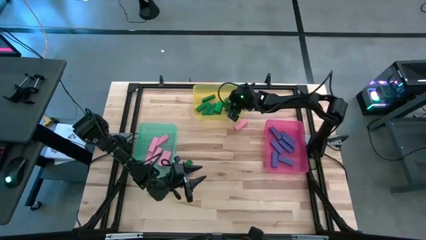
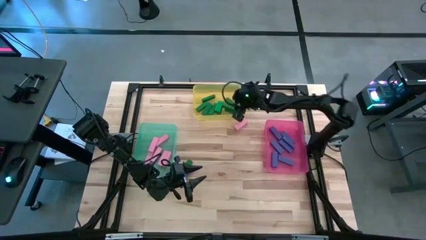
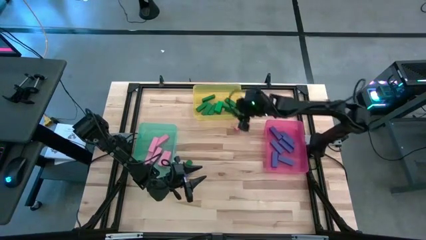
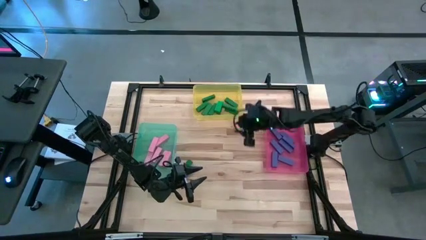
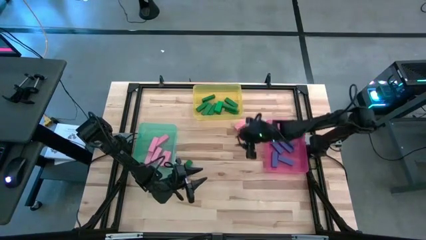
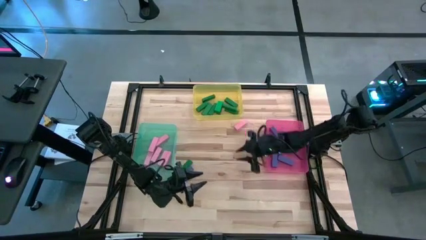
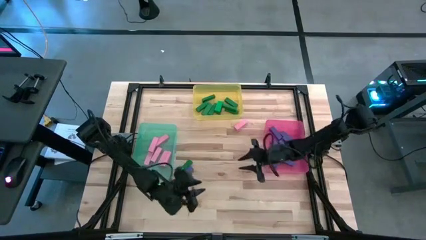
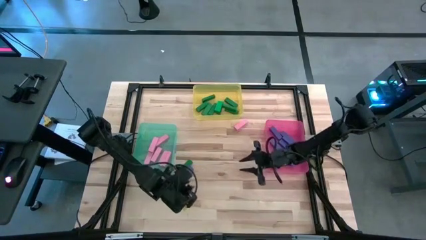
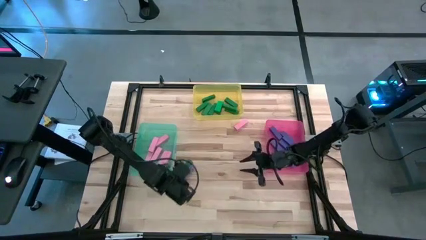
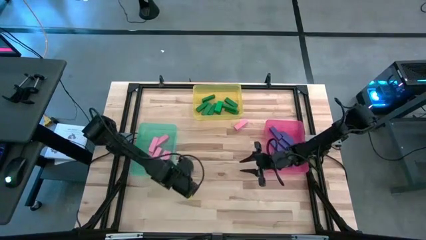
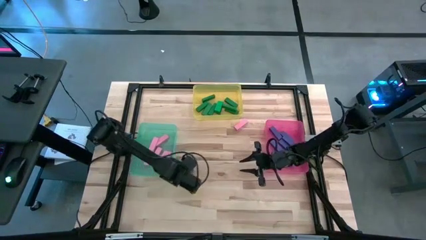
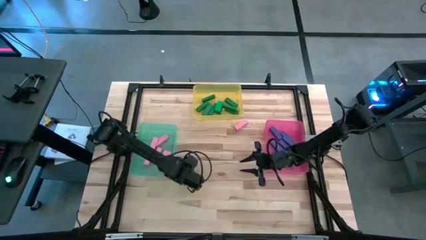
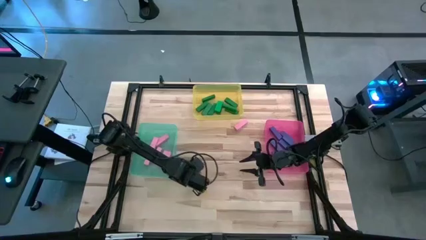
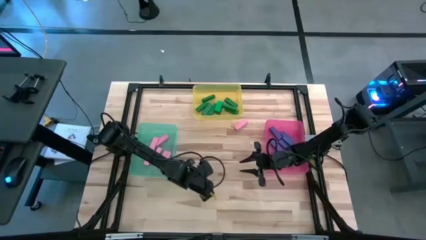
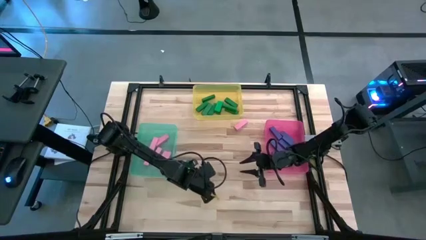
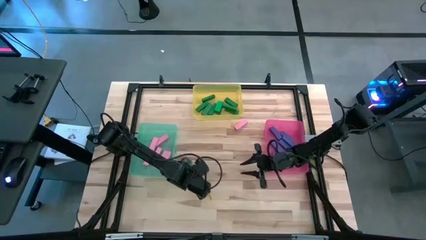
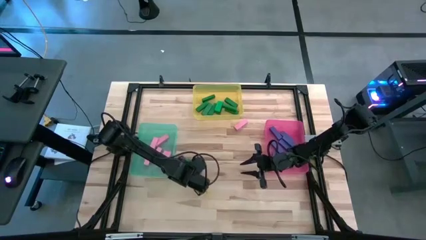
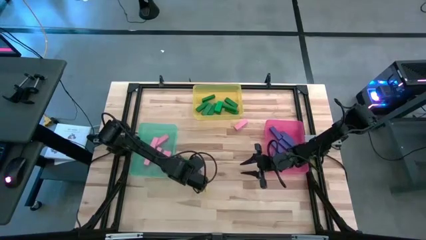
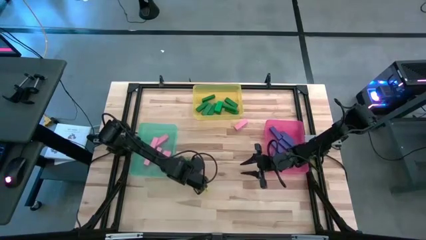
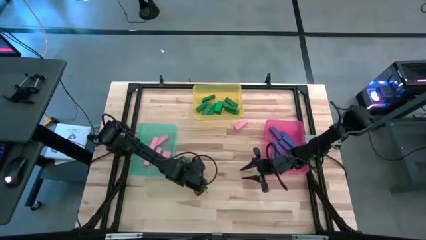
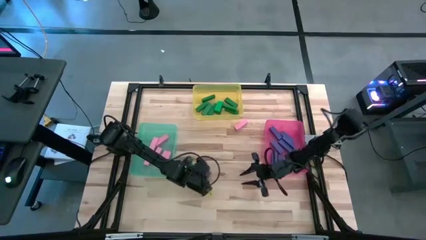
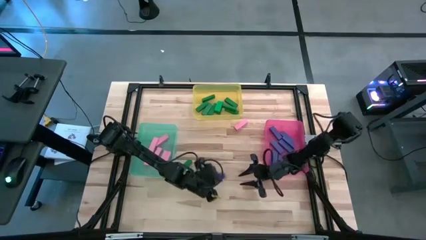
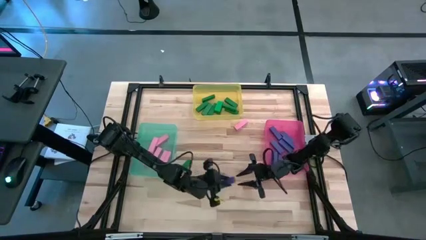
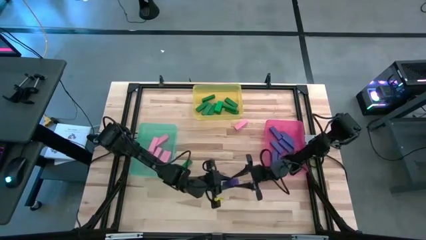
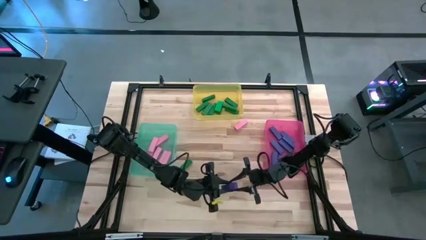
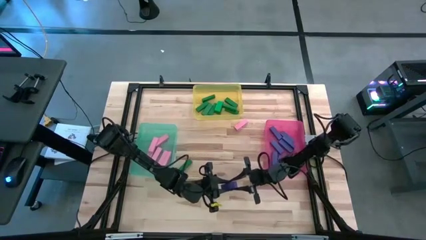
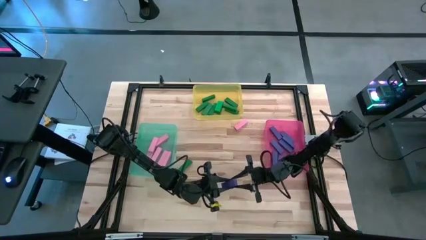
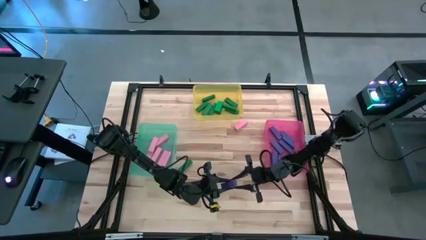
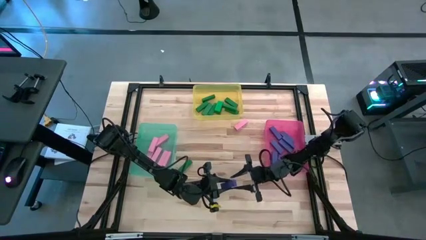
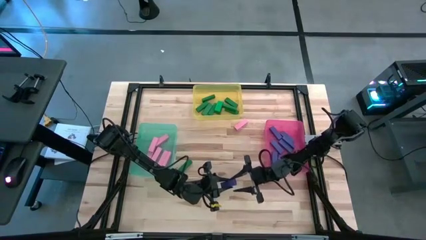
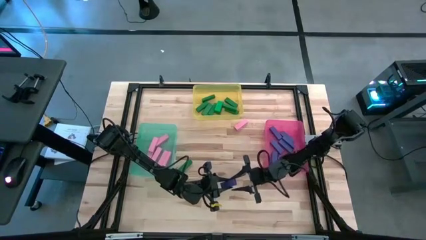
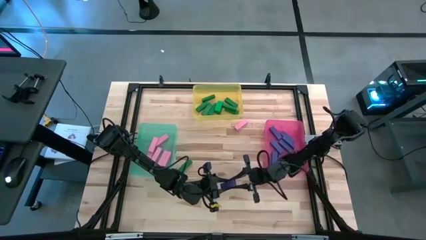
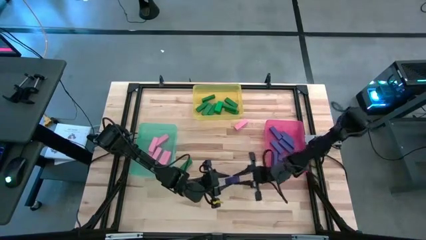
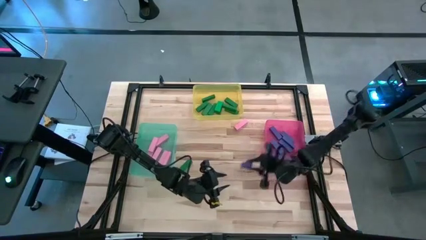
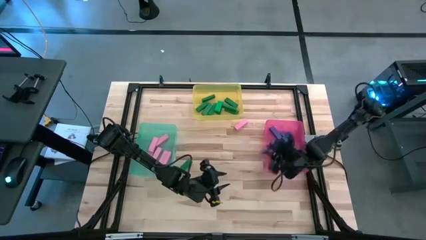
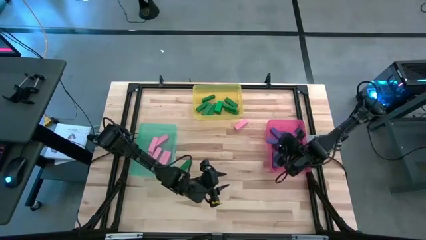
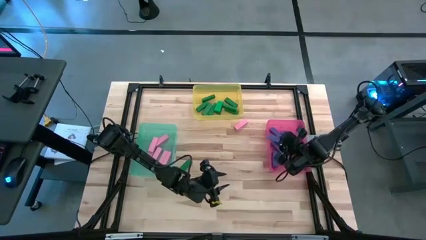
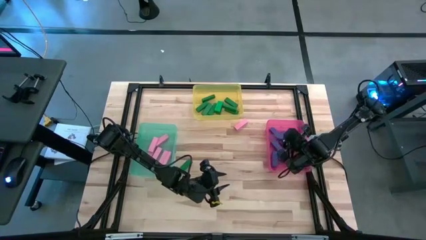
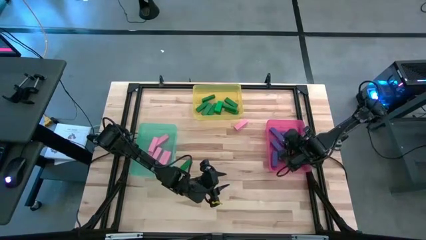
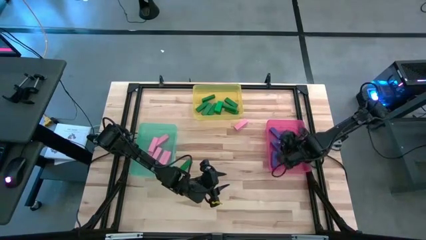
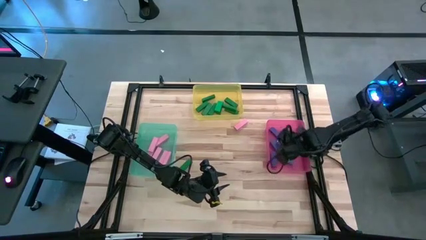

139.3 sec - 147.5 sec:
Task: Sort blocks
Put the blue block into the pink bin

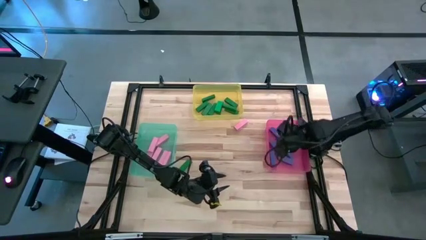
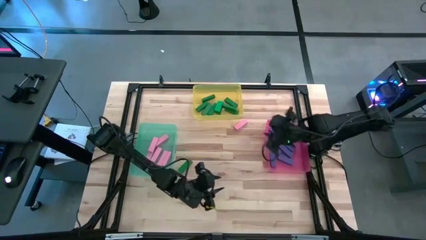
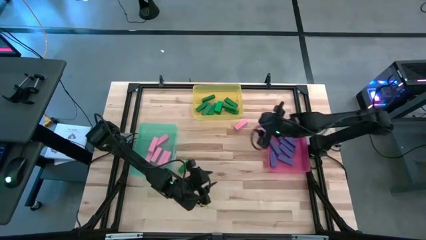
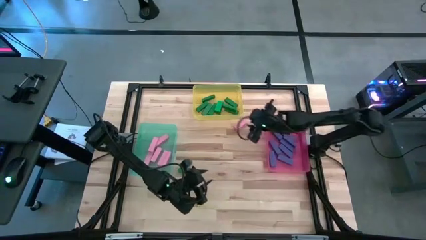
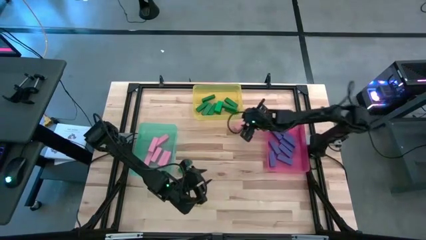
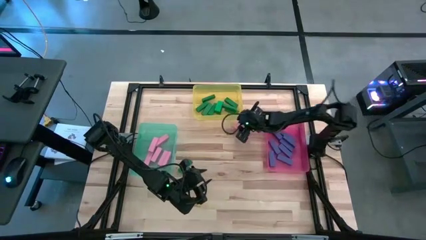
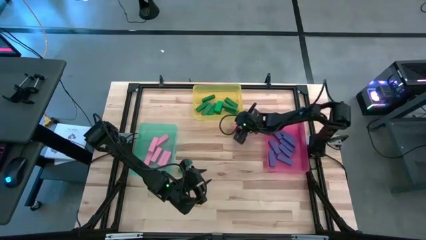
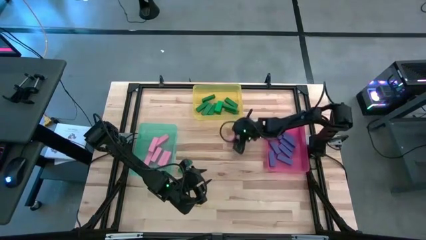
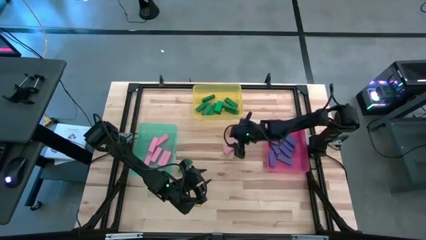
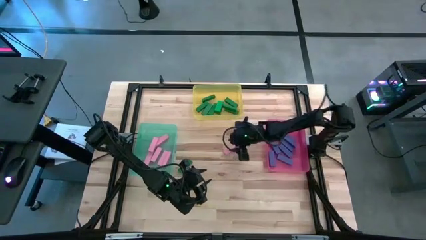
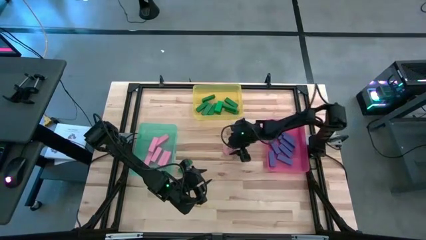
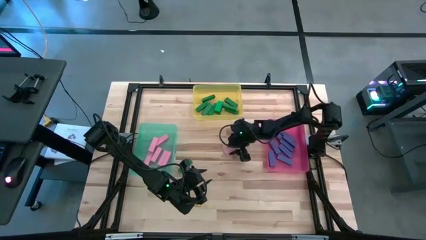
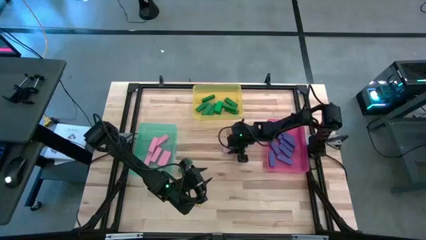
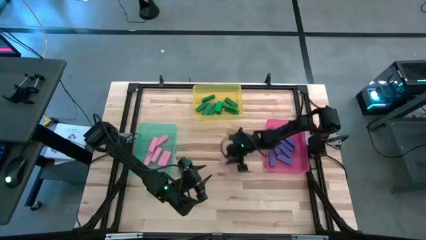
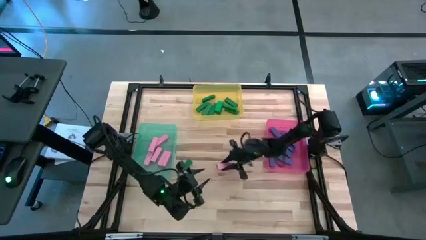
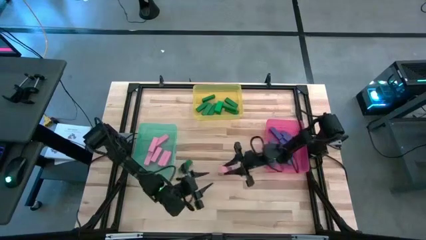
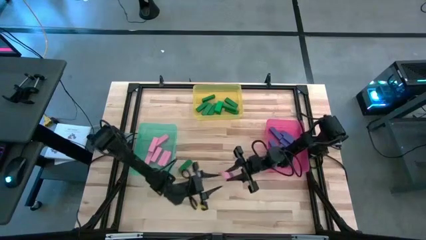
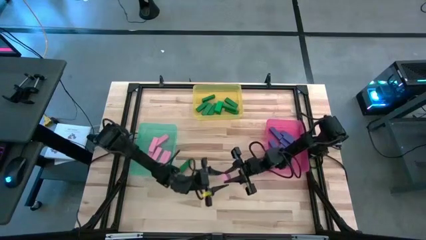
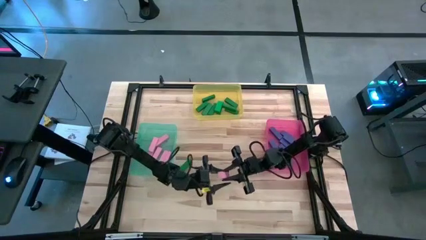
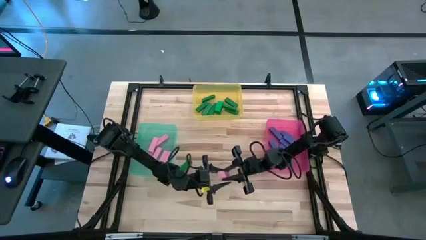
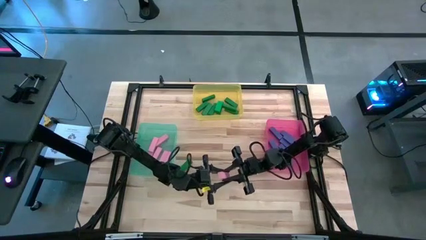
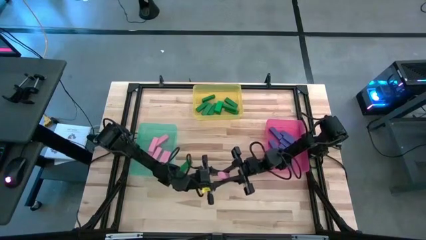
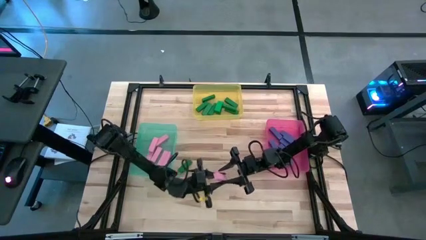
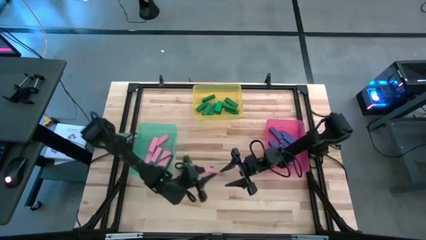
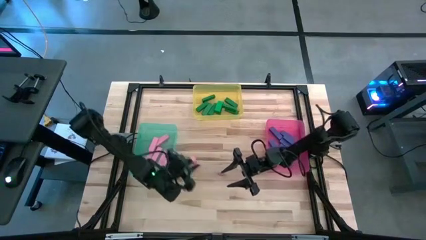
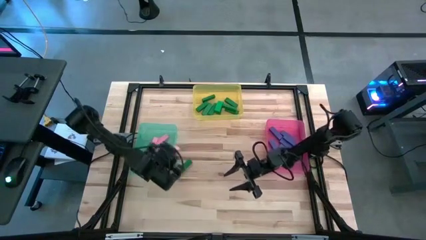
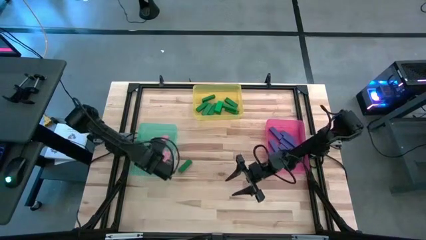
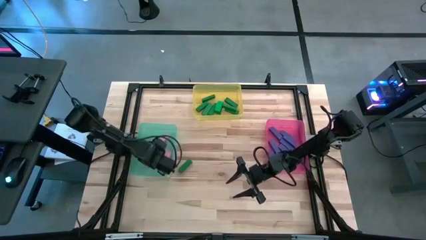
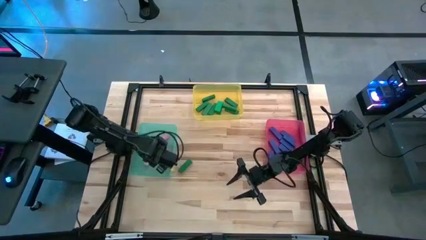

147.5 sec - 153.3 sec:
Put the pink block into the blue bin

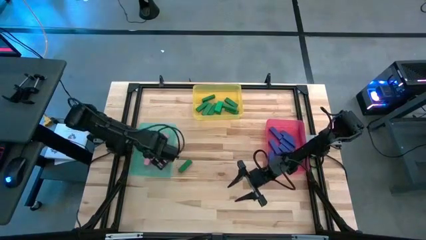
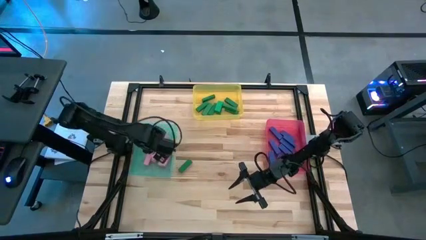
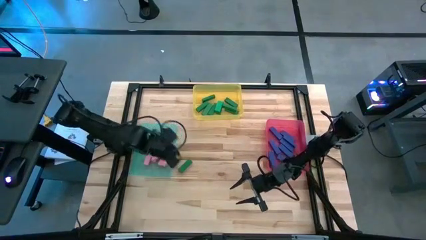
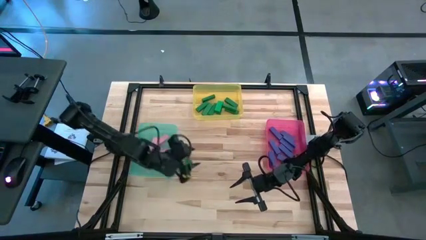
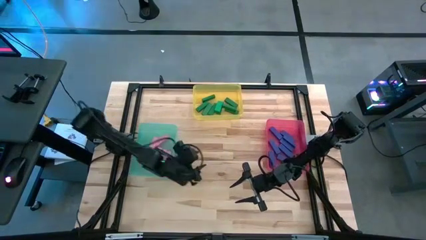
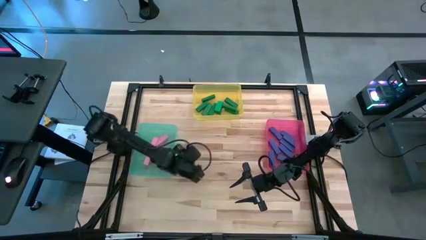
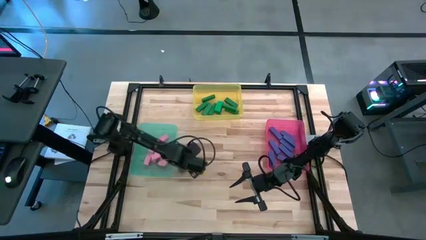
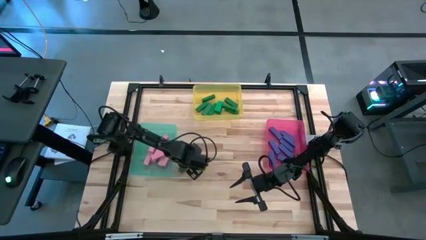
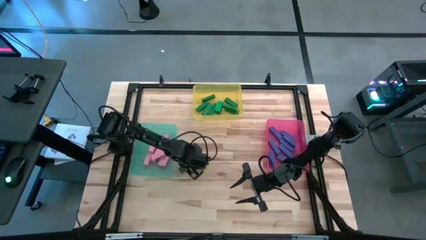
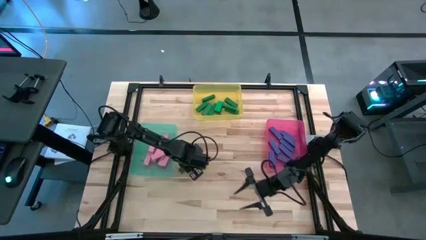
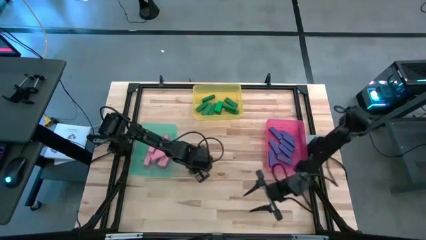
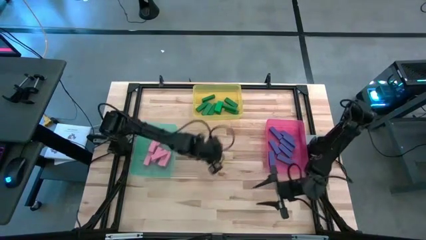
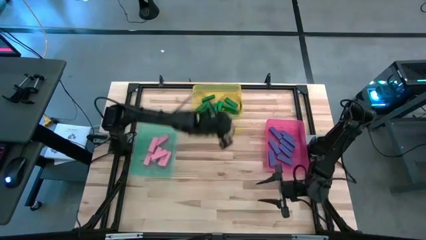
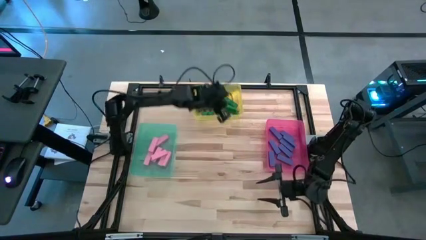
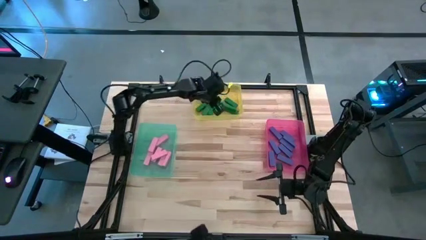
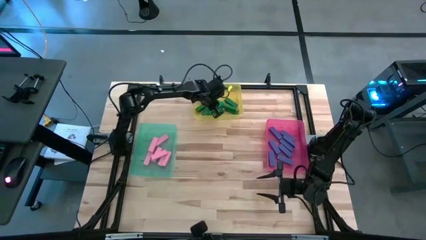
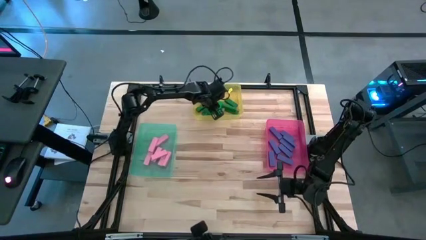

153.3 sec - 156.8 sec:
Put the green block into the yellow bin
